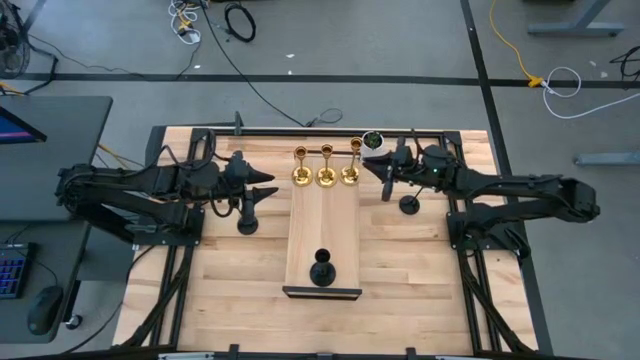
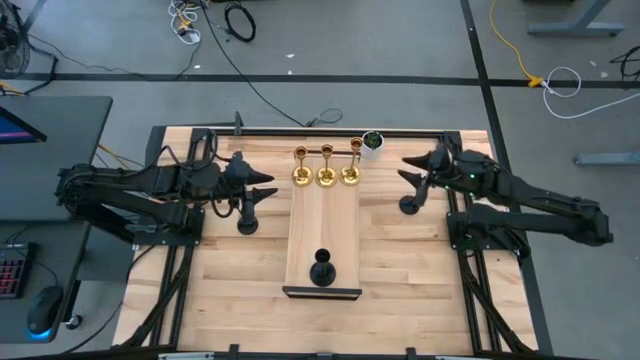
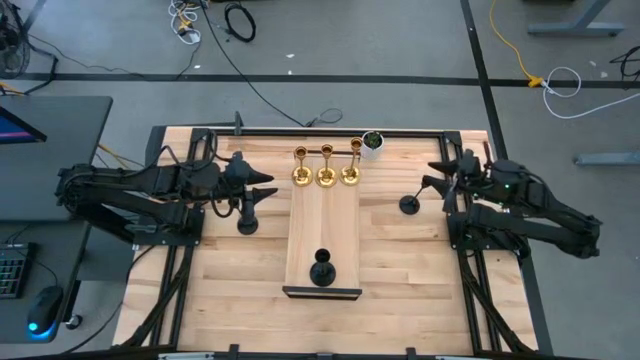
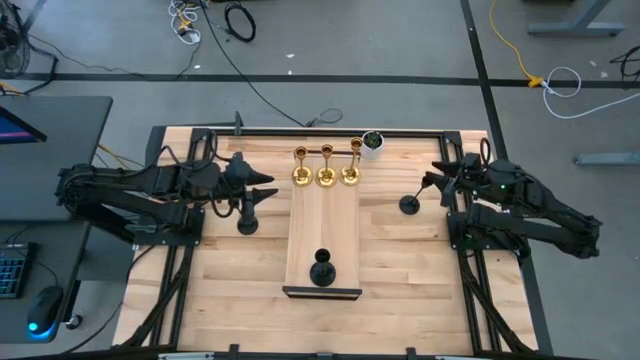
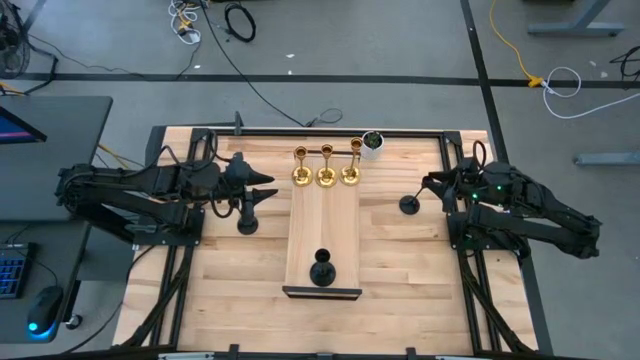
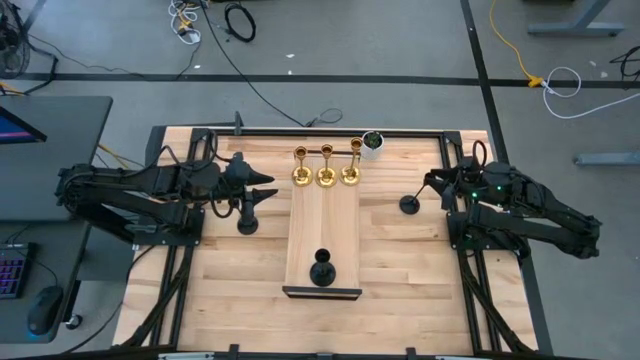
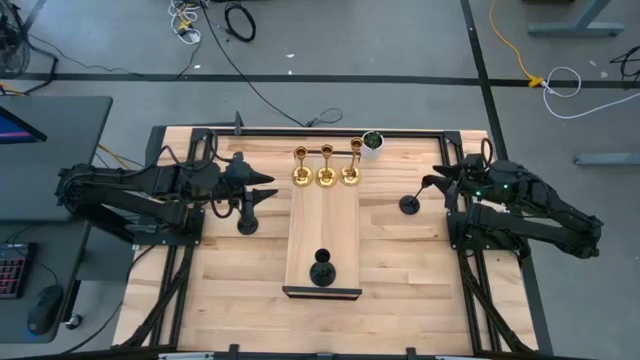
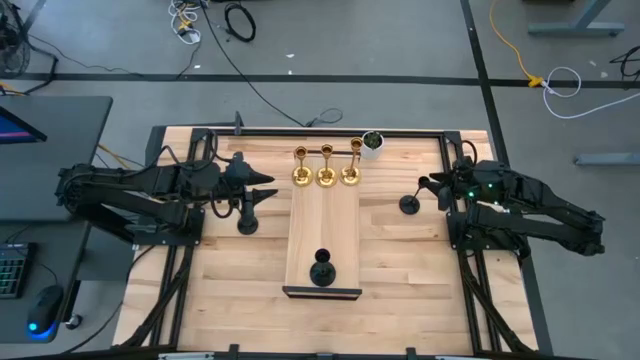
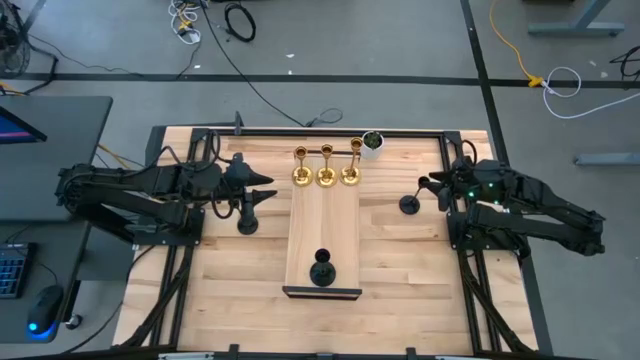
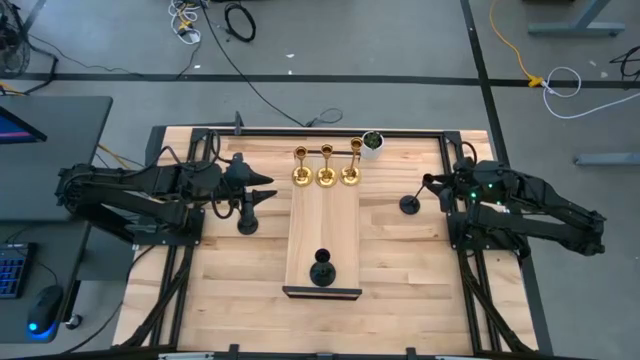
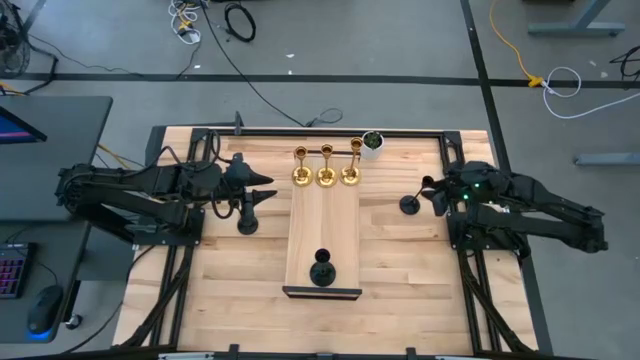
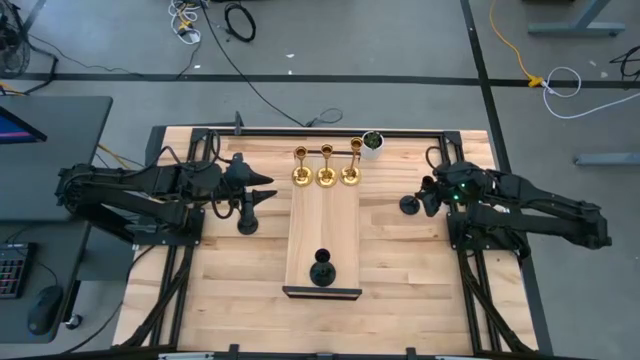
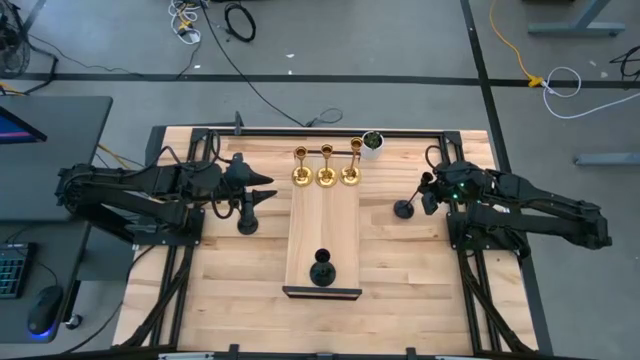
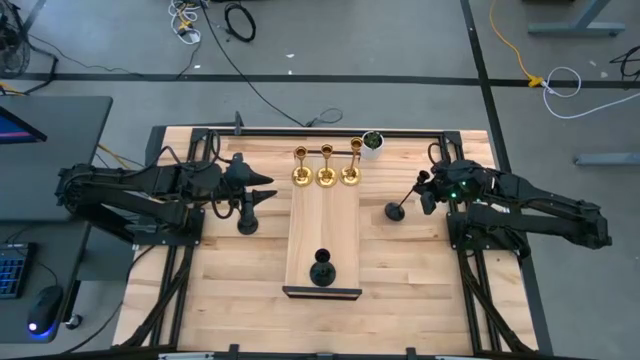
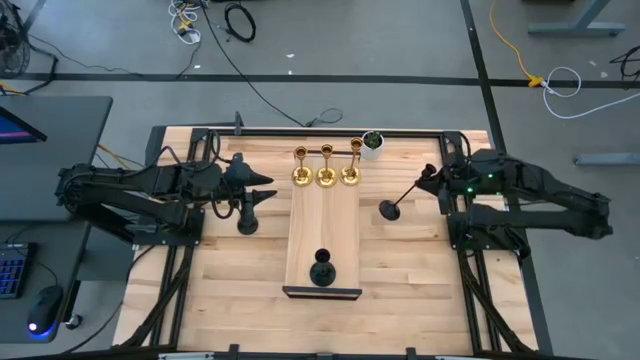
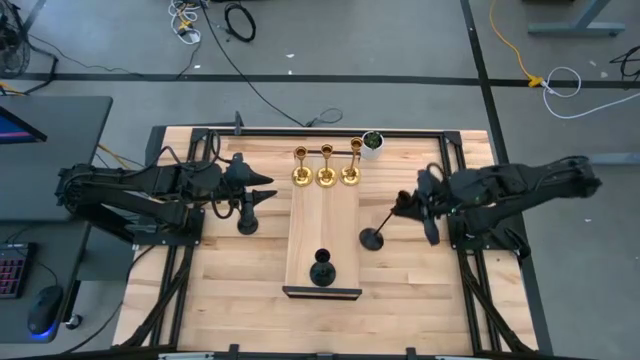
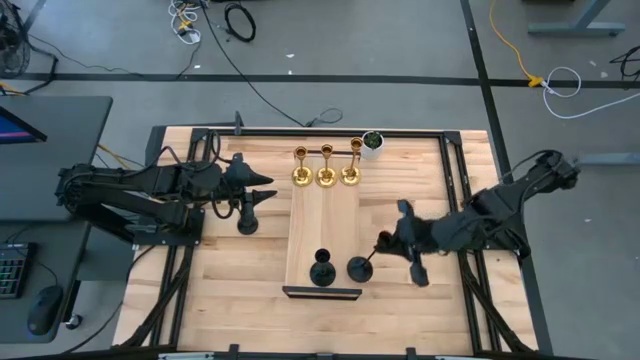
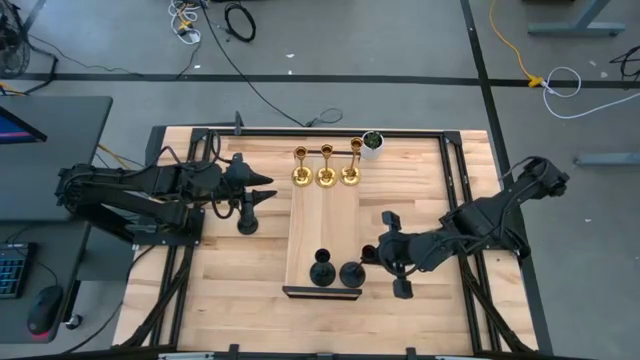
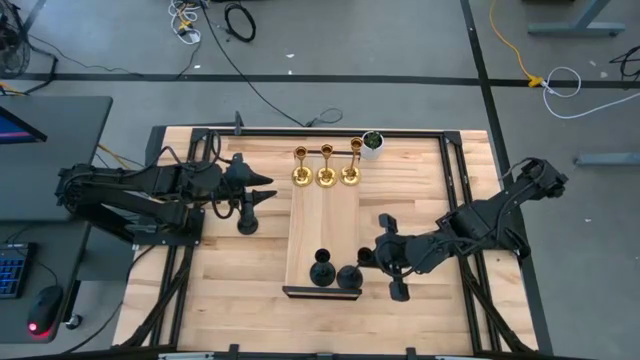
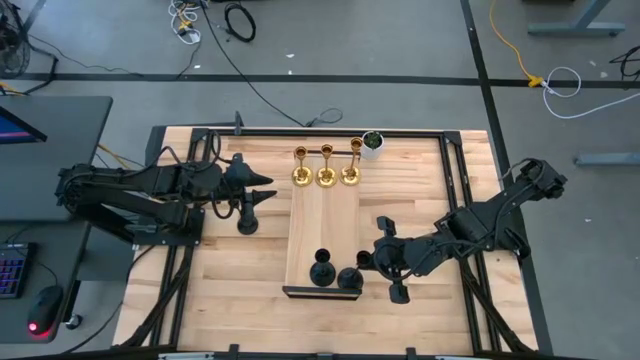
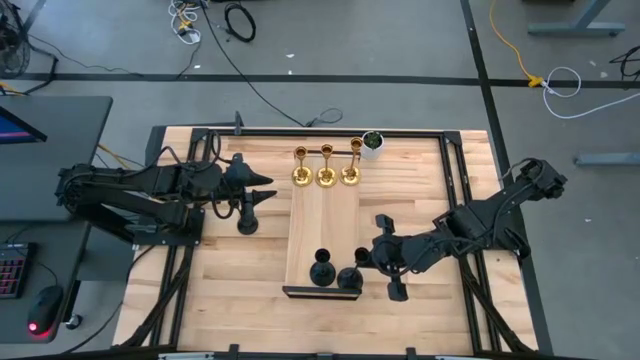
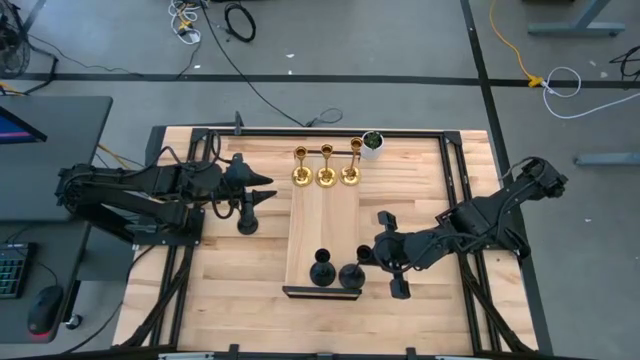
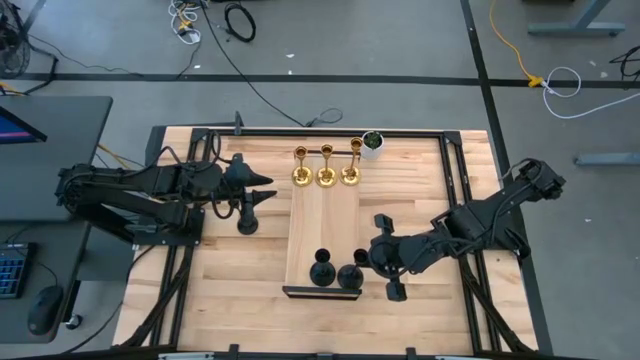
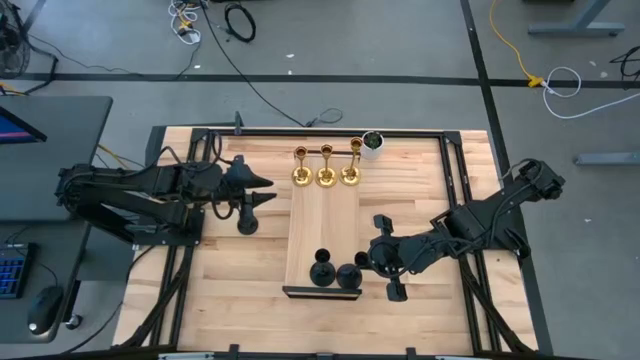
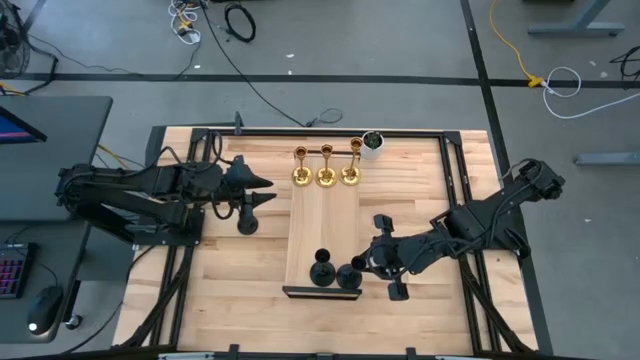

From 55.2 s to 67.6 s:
Task: Pick & Place candle stick holders
Put the right black candle holder aligned with the black candle holder on the shelf

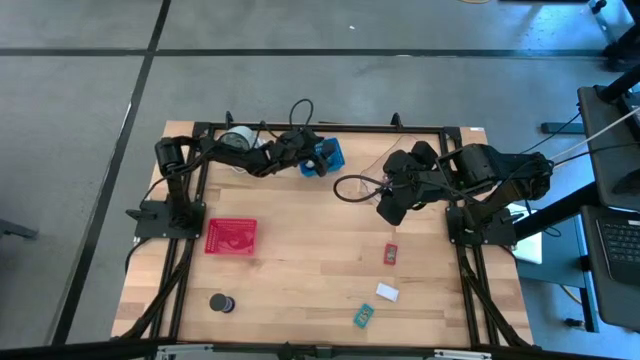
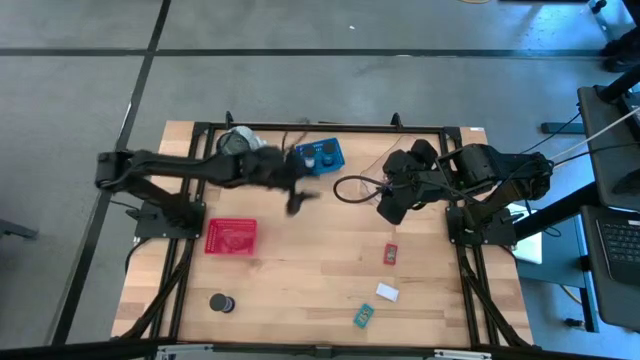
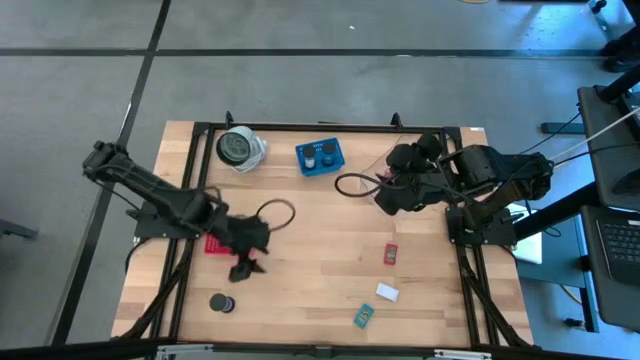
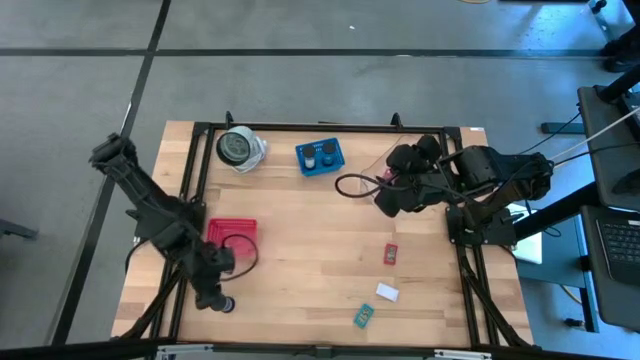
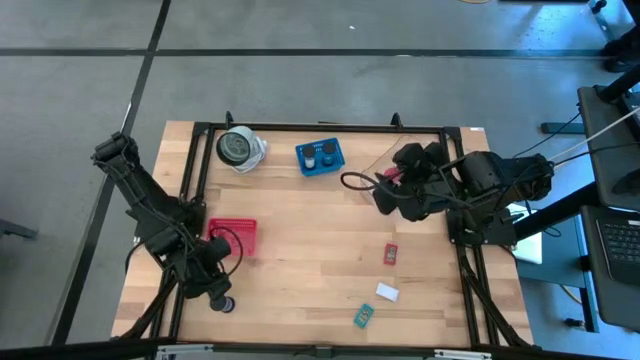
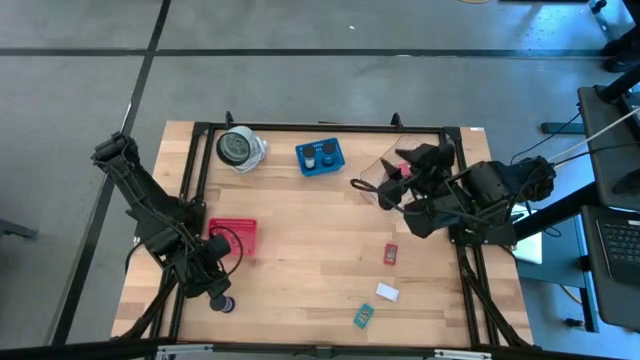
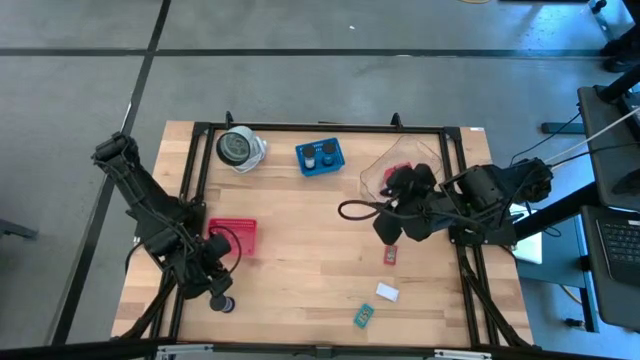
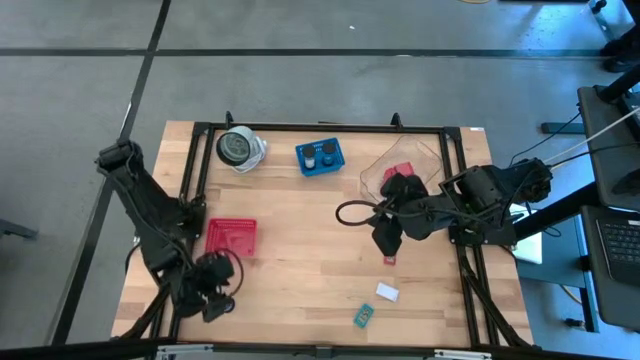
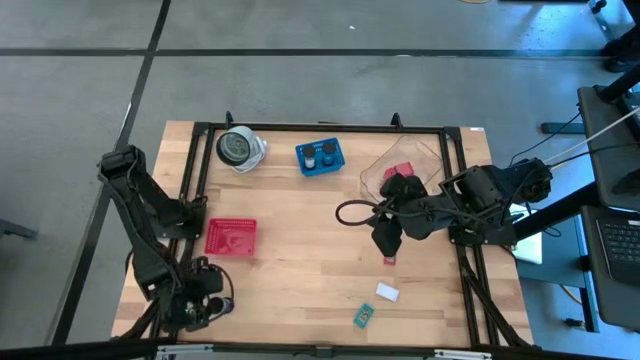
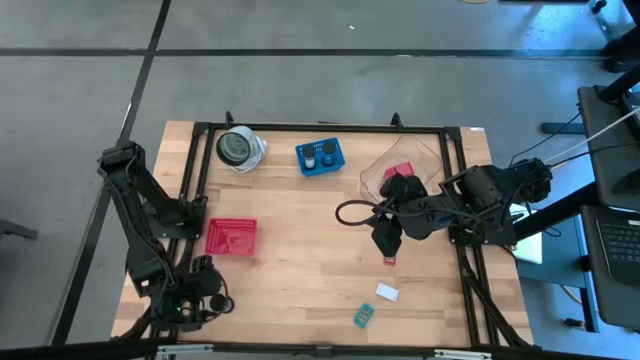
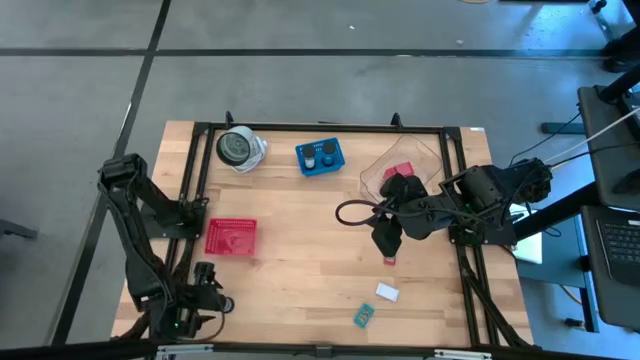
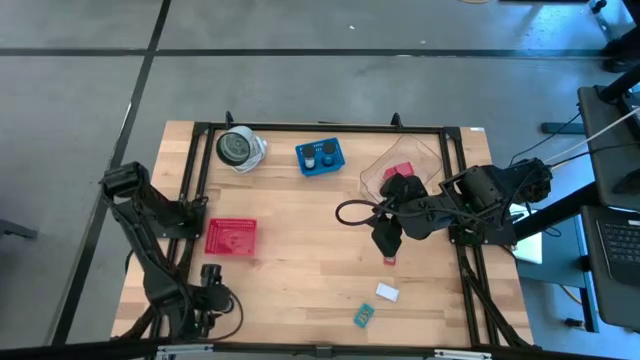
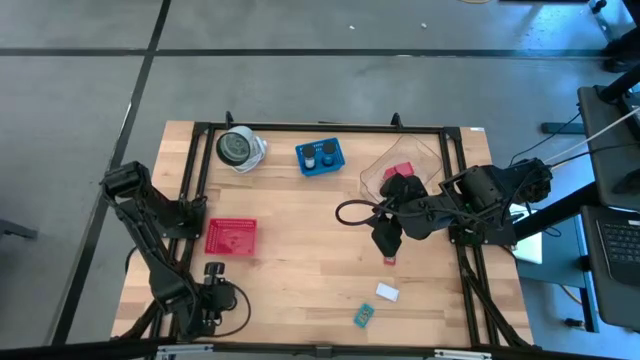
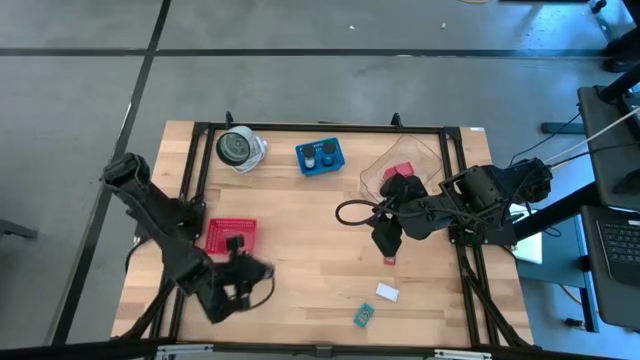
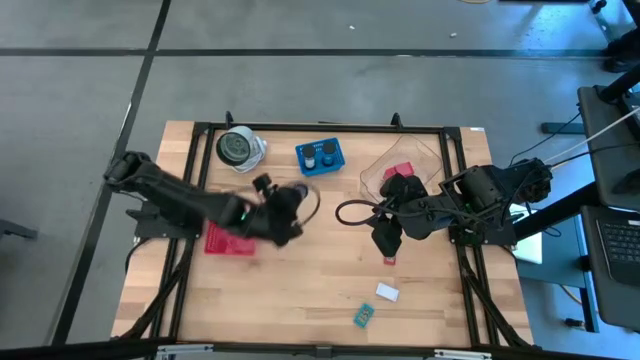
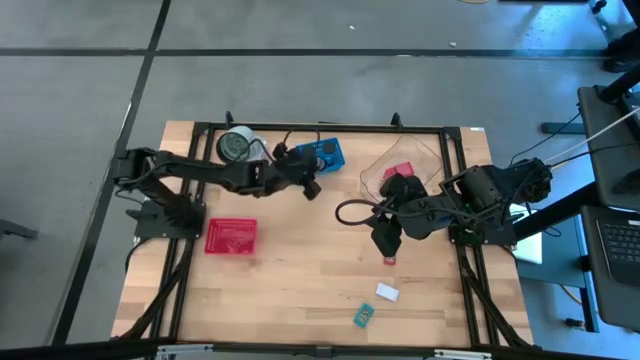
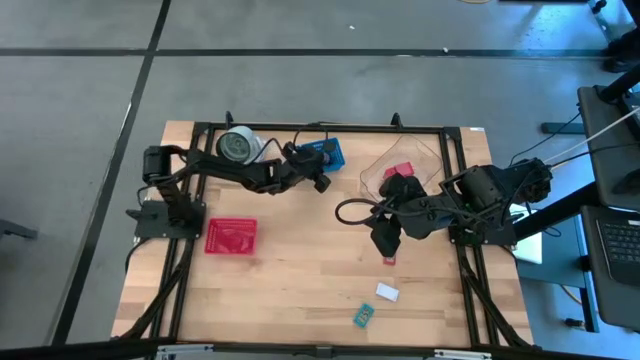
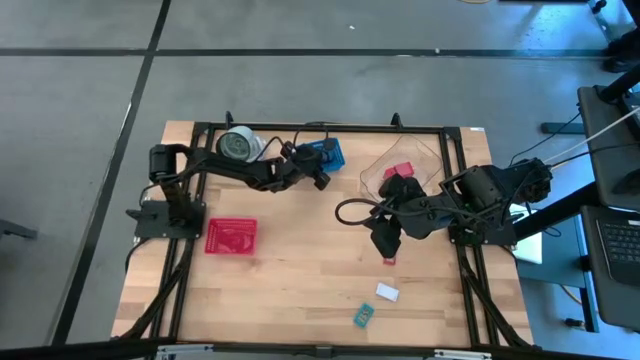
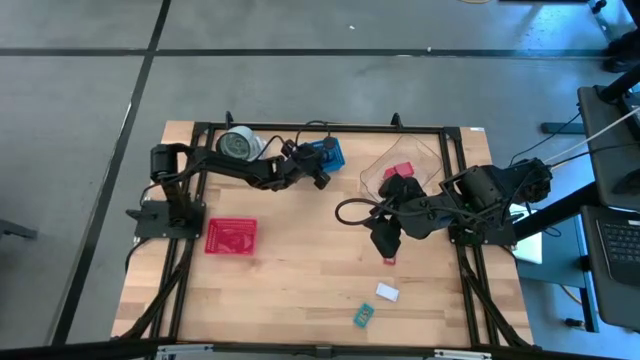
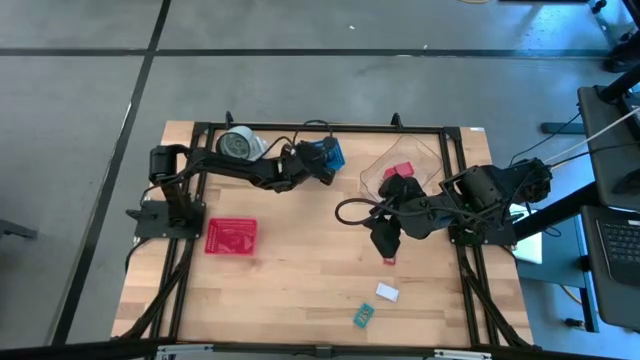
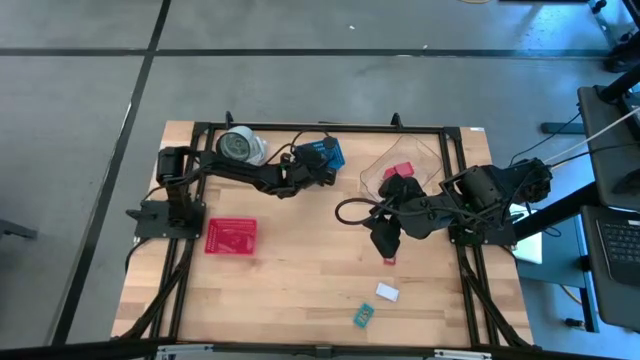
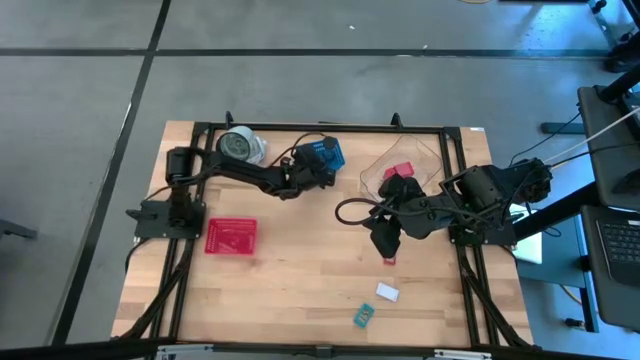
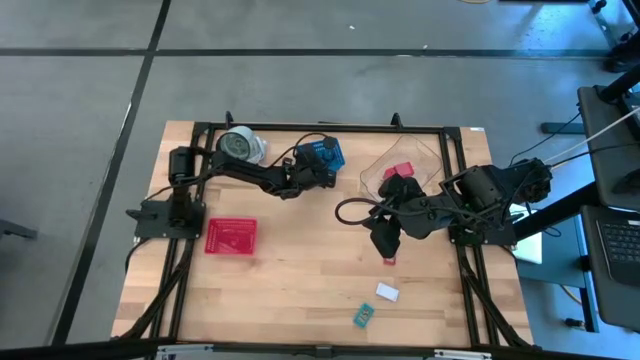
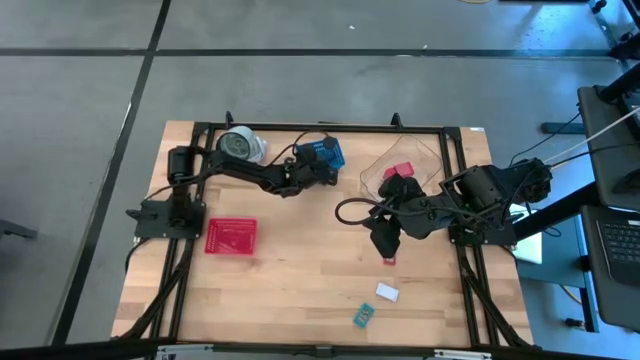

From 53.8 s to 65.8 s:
Task: Pick & Place Office items
Put the bottom-left black hourglass into the blue basket
